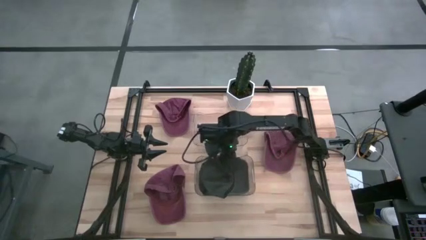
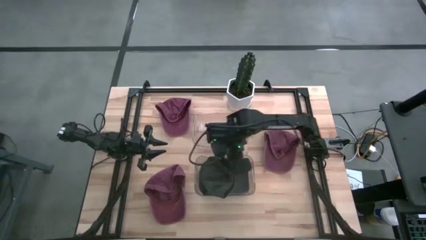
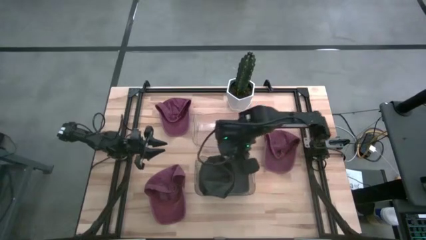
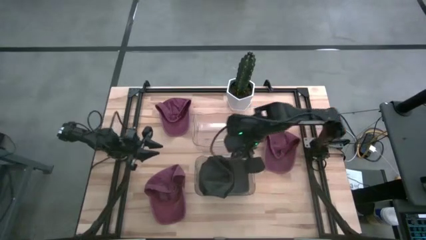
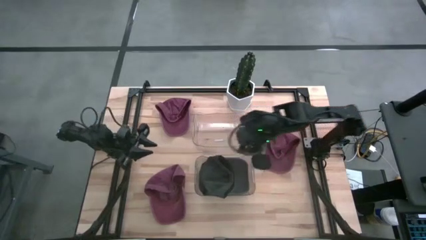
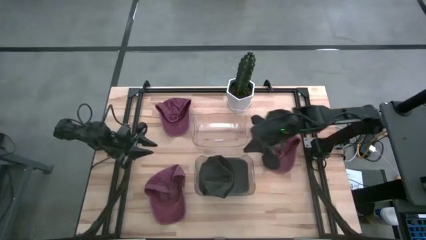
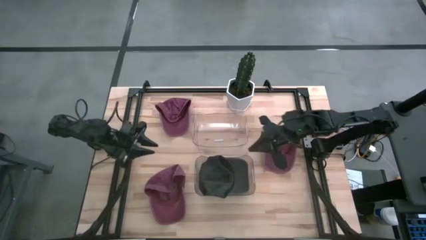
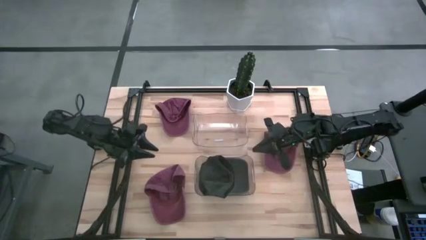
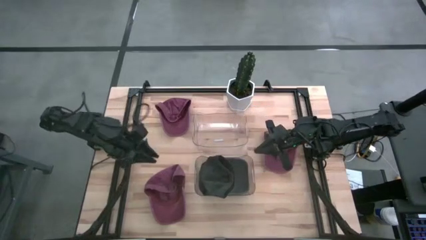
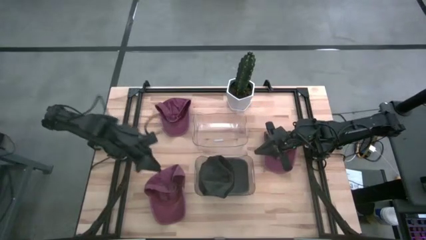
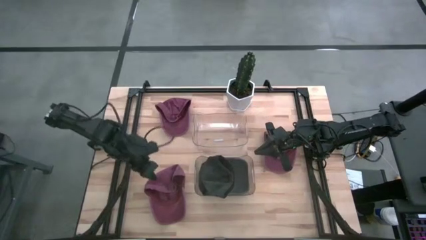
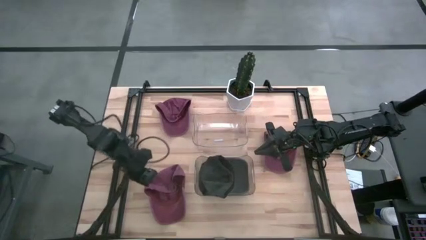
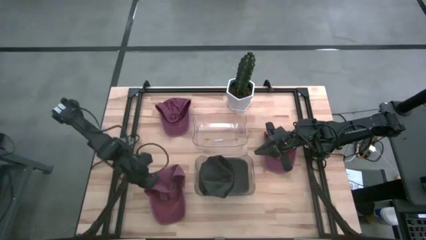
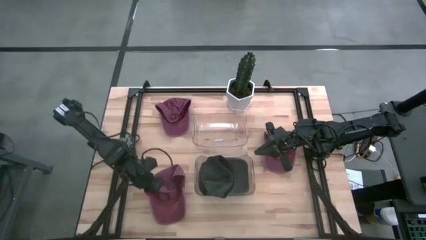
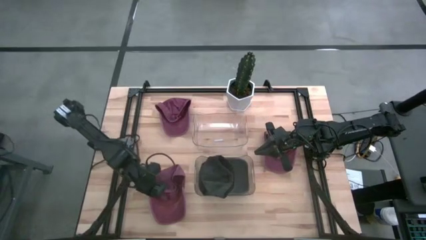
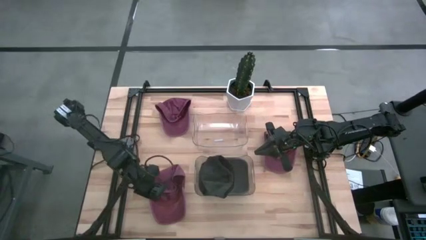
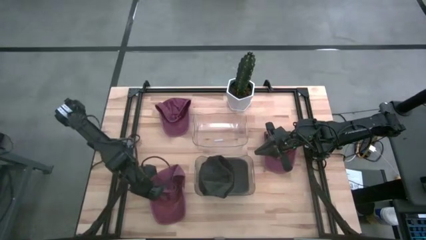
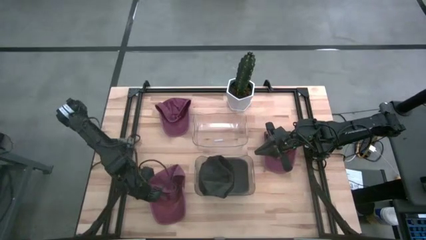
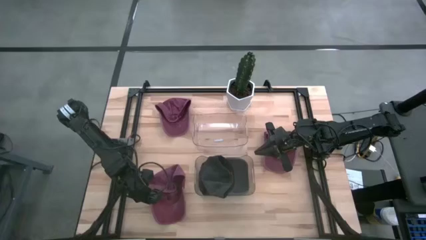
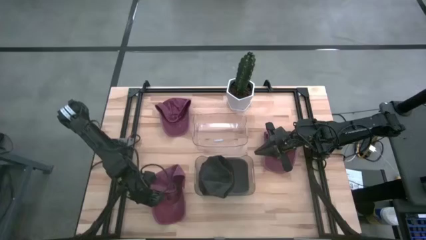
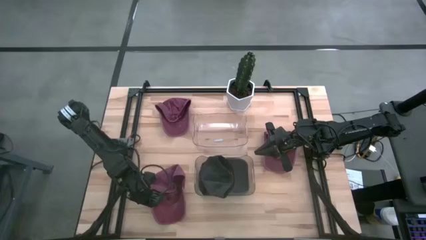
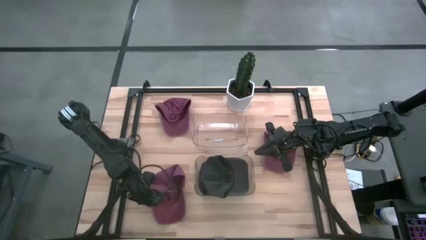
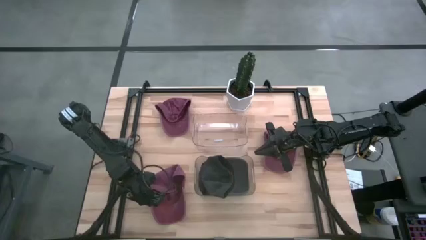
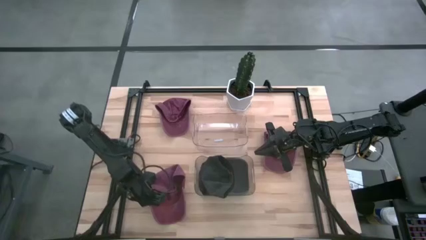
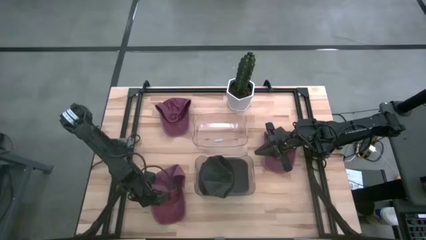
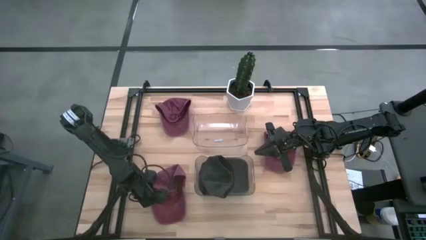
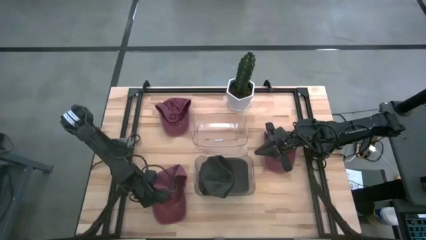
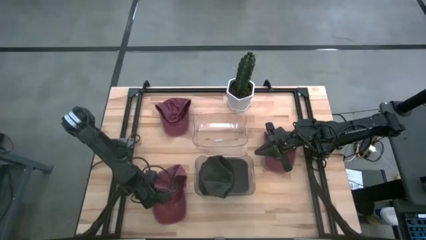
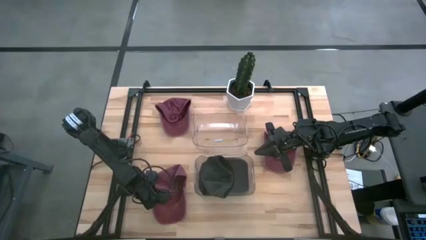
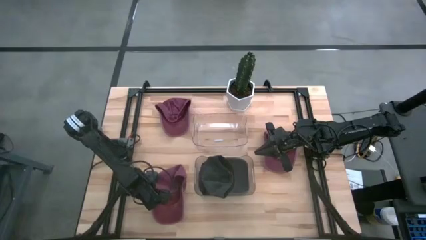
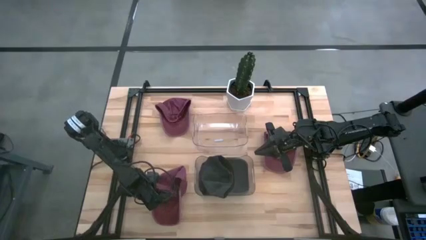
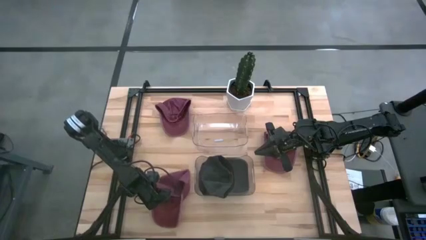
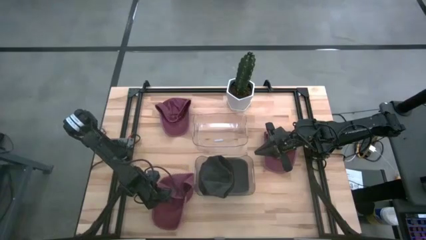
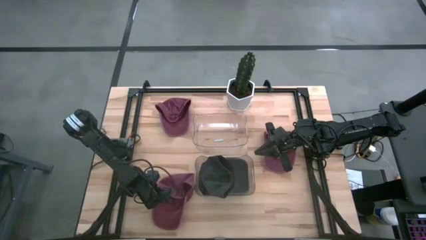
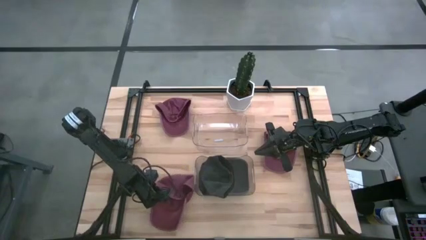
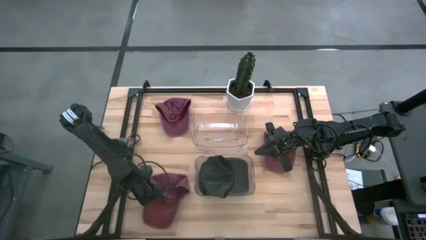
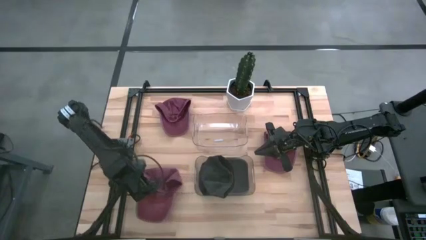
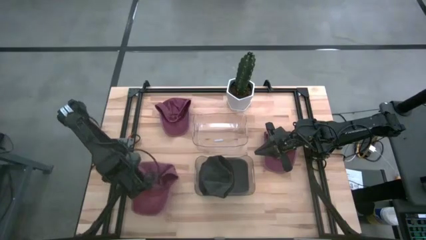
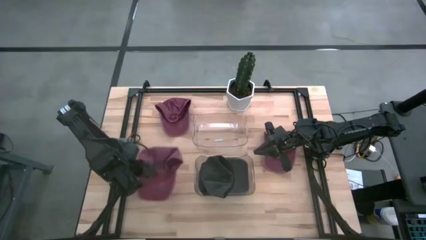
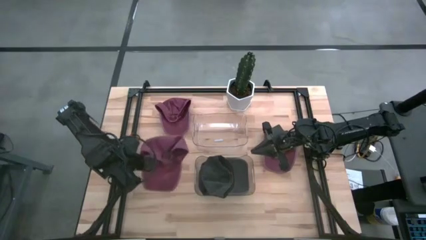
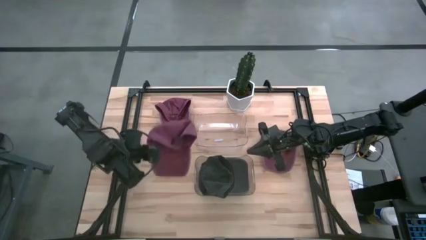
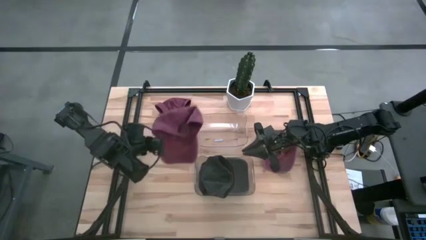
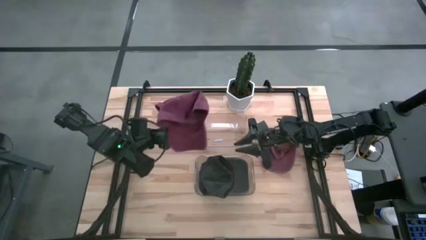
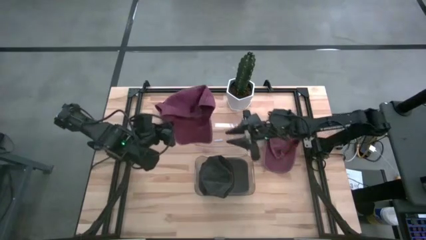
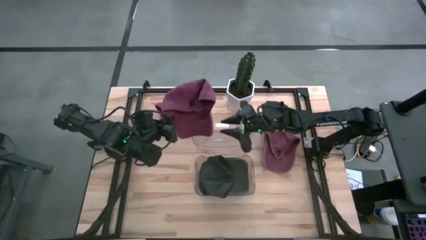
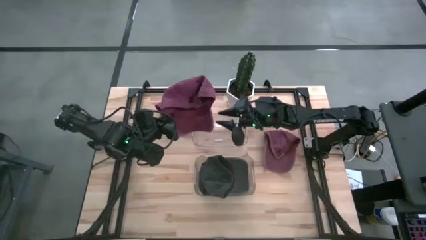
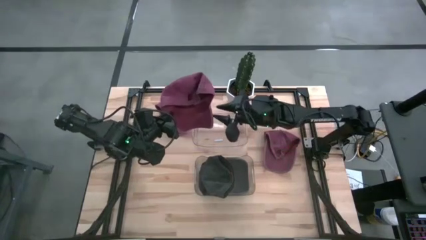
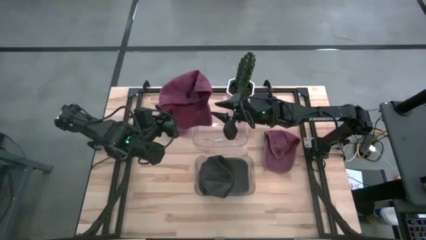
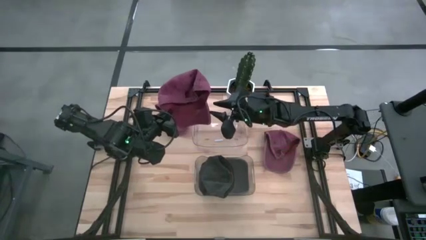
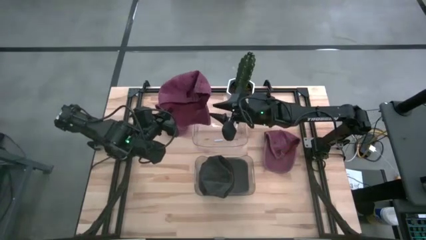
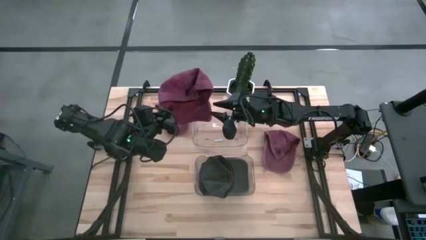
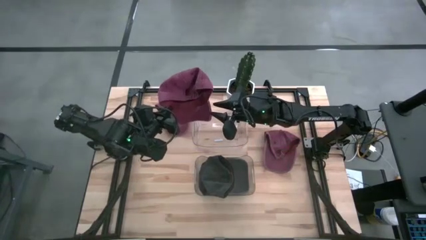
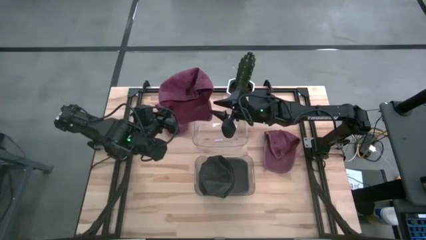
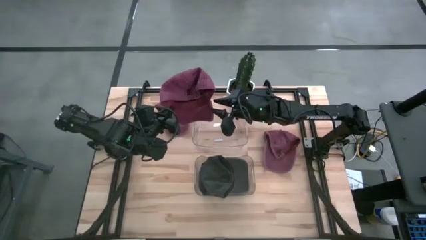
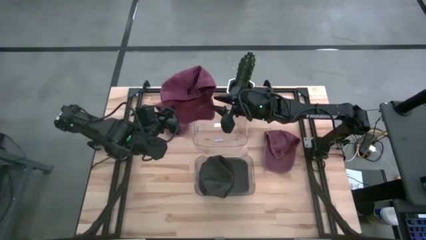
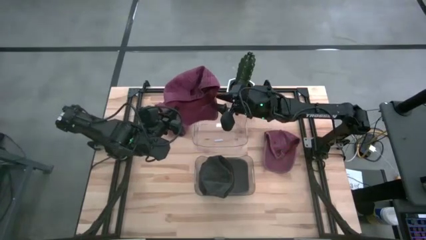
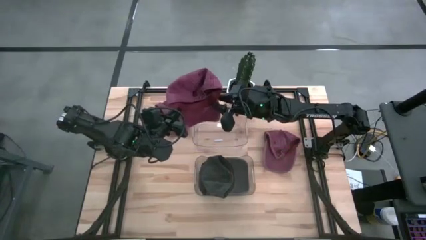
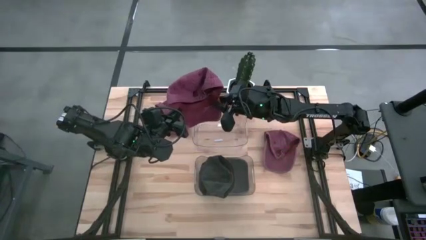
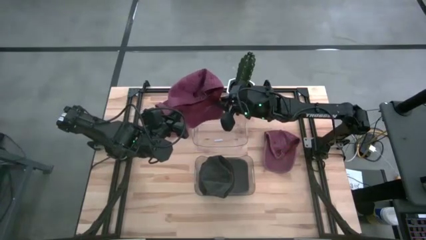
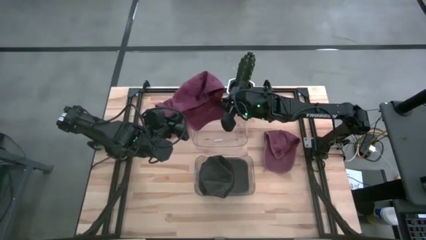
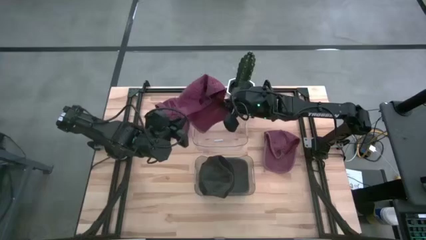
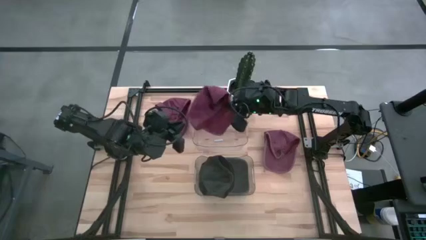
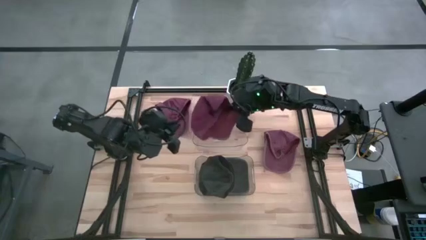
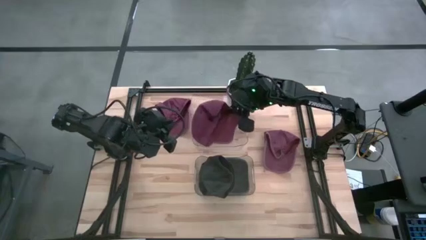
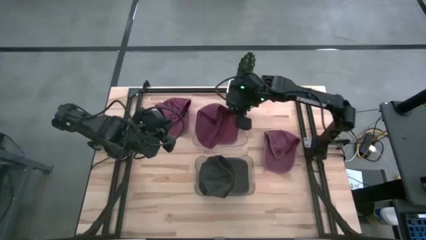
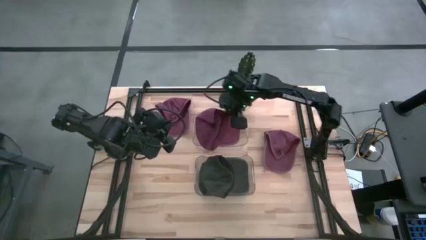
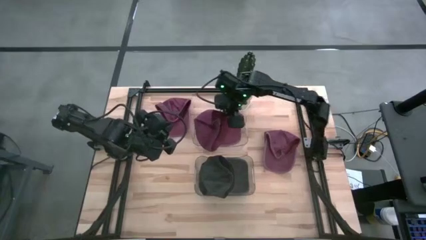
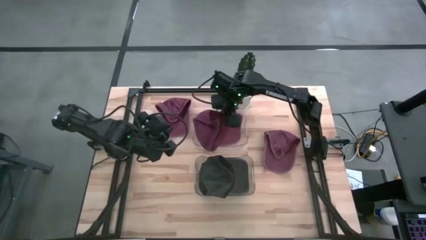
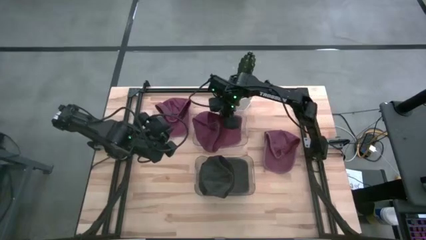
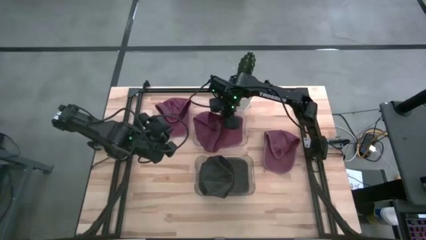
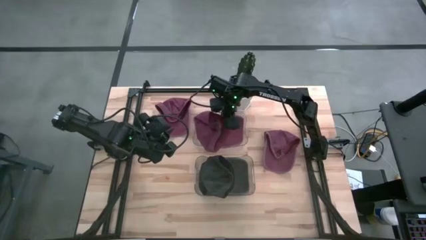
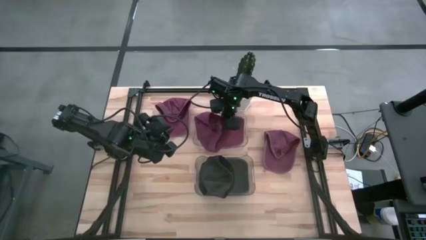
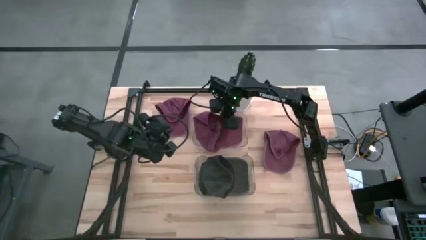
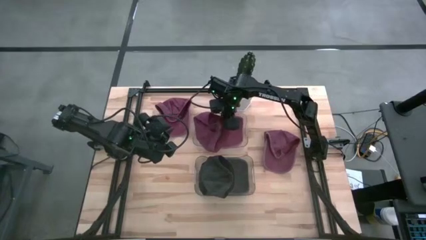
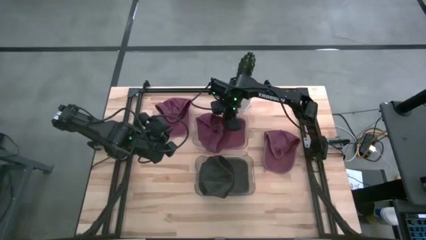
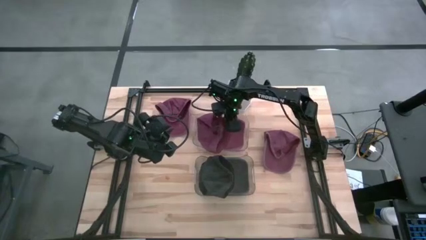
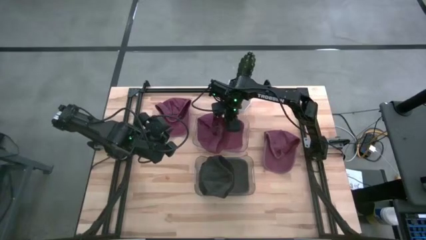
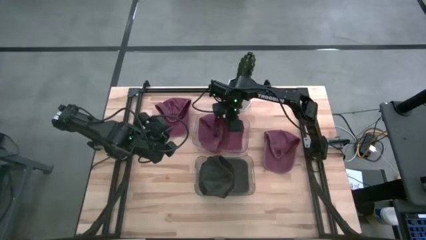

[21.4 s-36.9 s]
Task: Pick & Place hat
Put the bottom red cap into the top transparent bin
